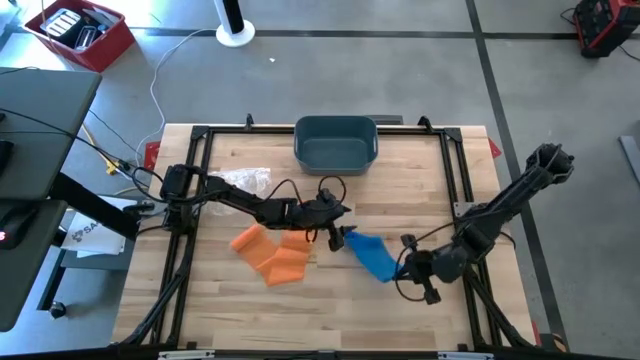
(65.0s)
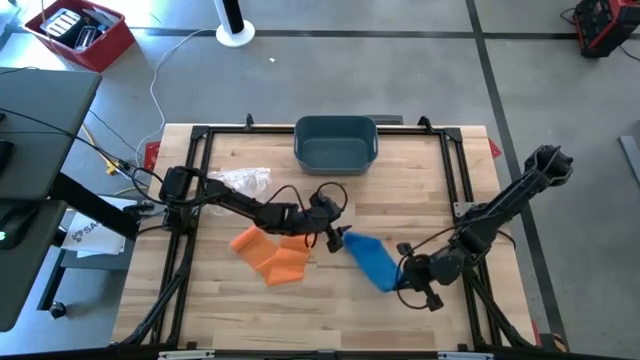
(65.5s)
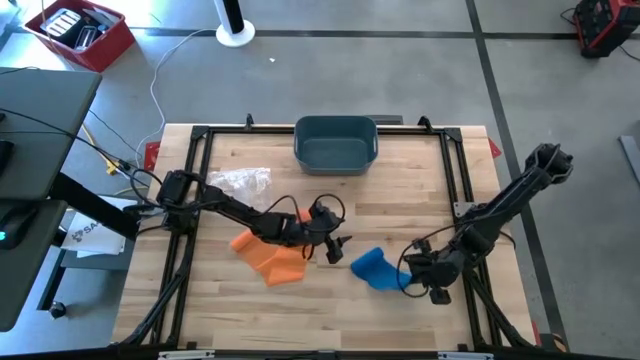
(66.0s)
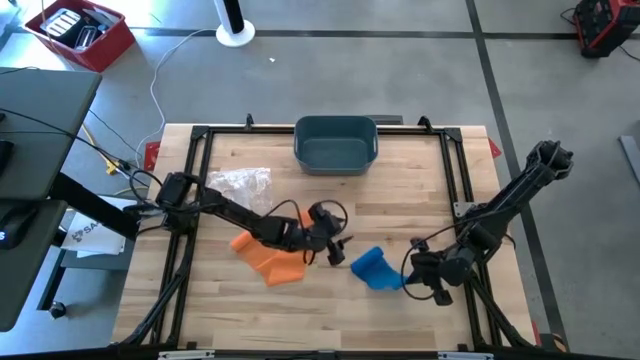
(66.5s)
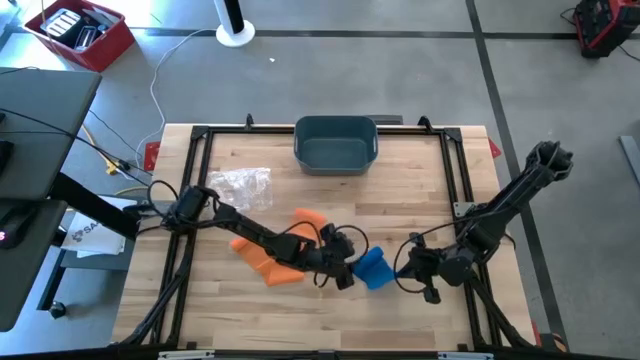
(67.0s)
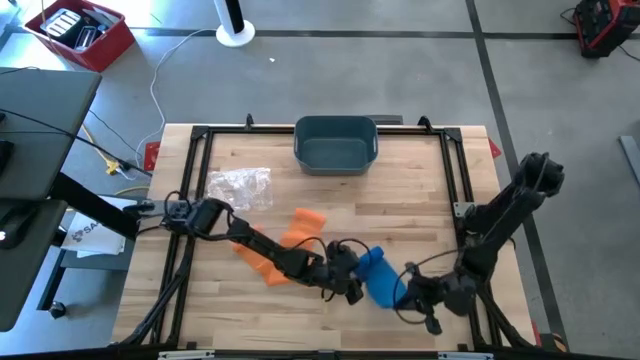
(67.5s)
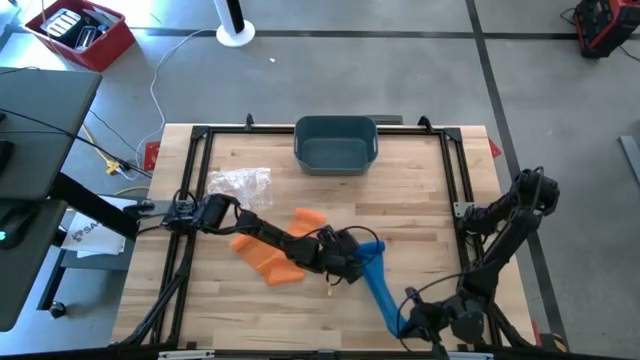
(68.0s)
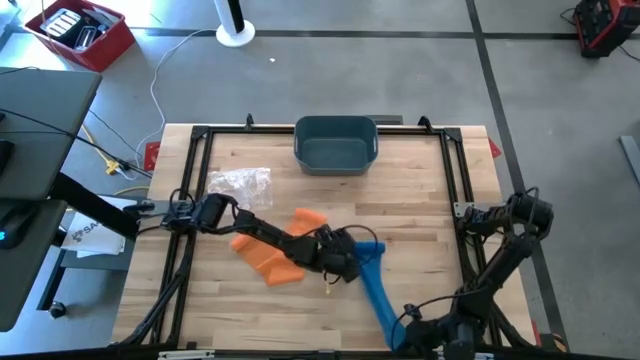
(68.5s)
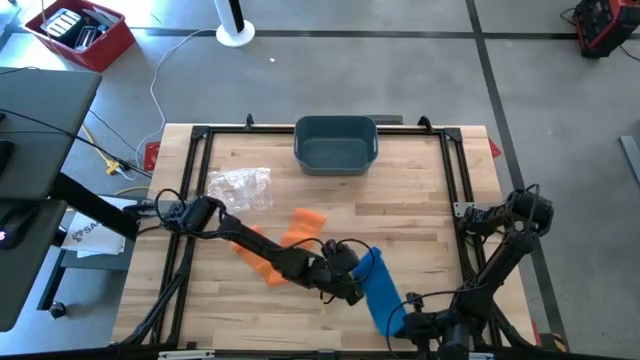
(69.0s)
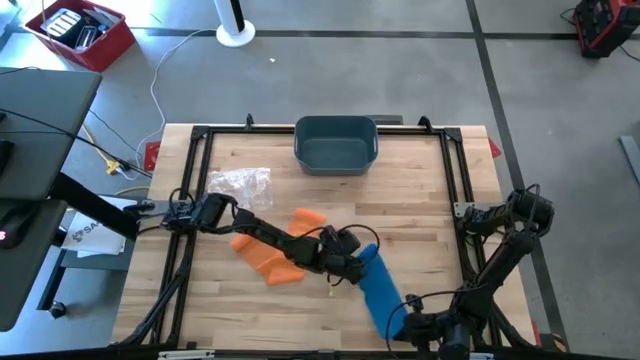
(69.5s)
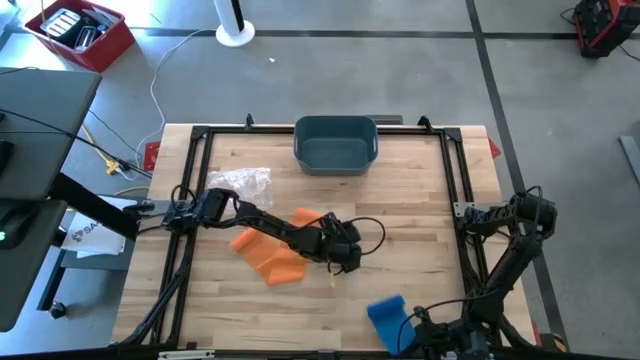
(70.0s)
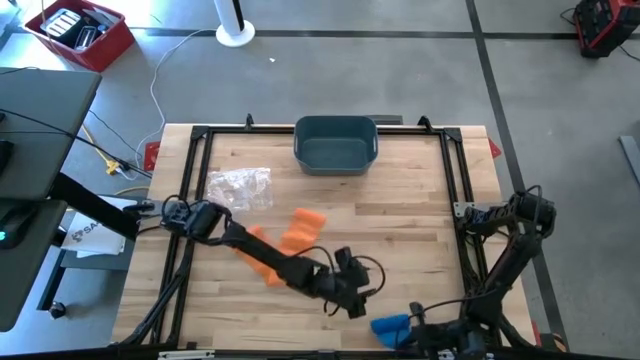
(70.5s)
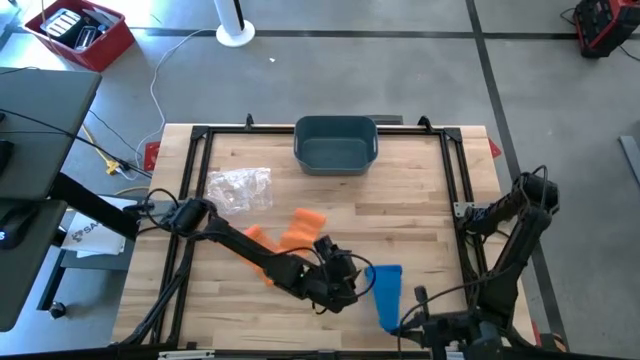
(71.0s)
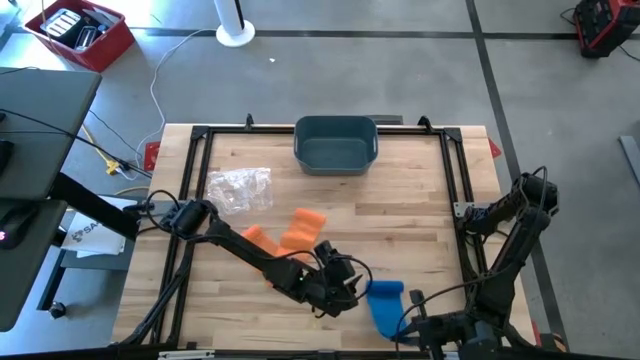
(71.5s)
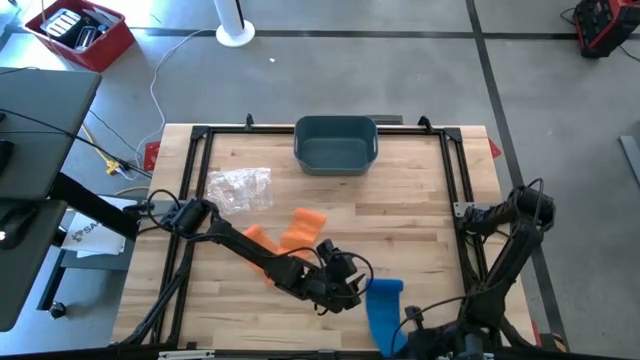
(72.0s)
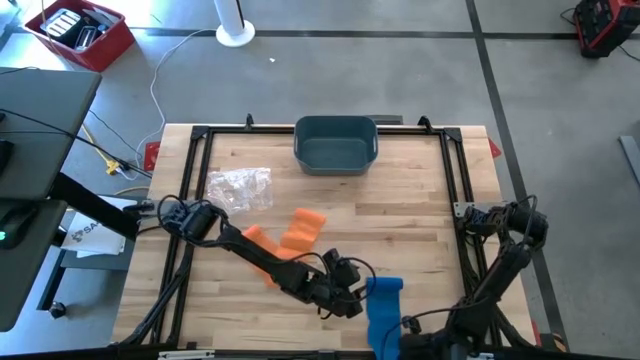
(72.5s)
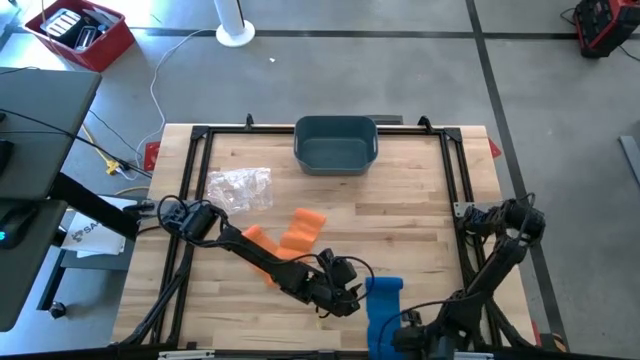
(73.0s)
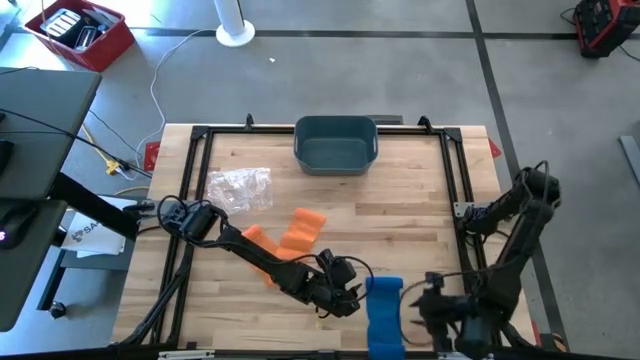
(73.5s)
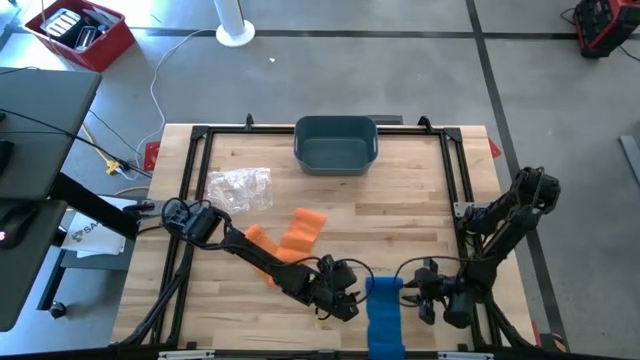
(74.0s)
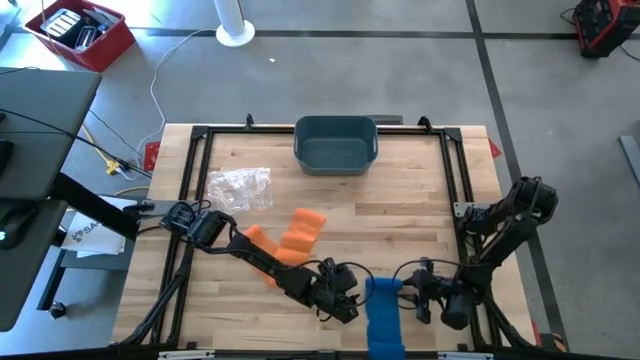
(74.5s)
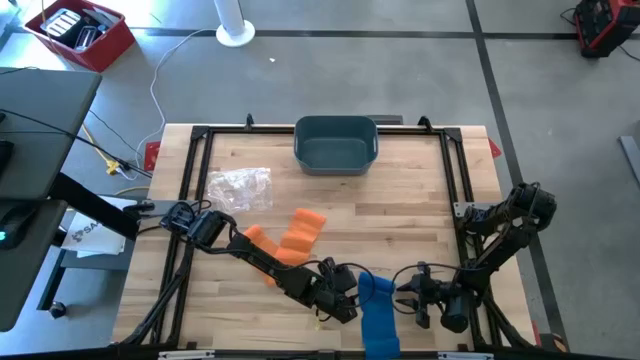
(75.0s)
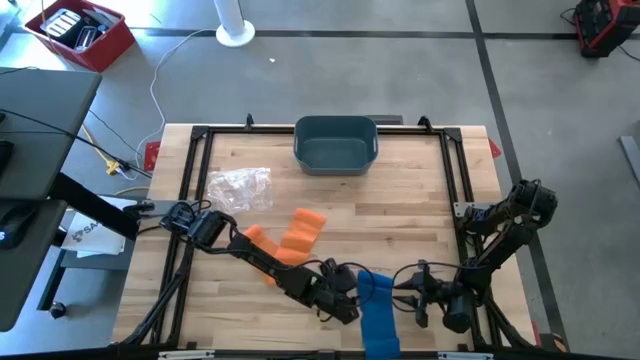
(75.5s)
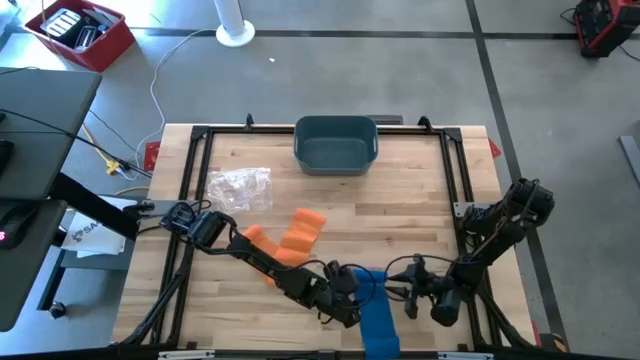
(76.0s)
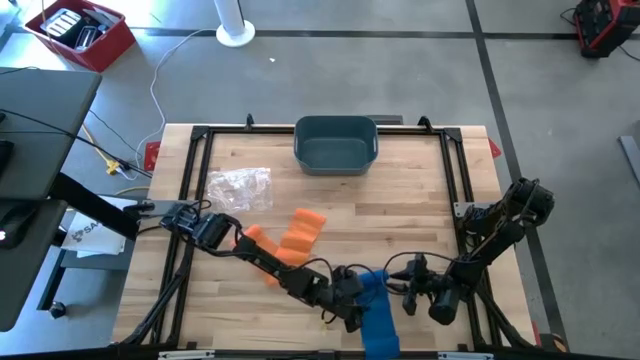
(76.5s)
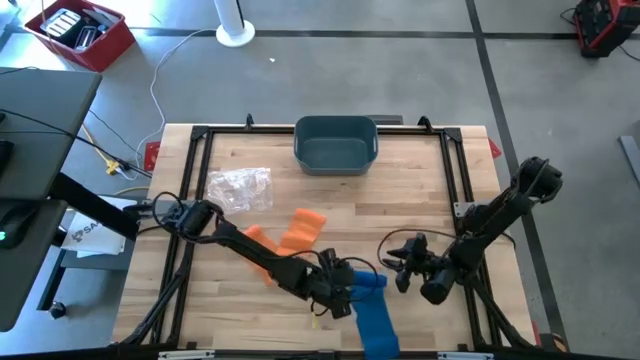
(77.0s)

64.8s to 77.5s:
Task: Roll bandage
Roll the blue bandage
